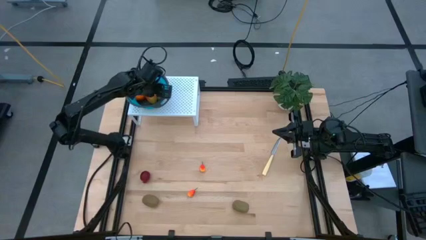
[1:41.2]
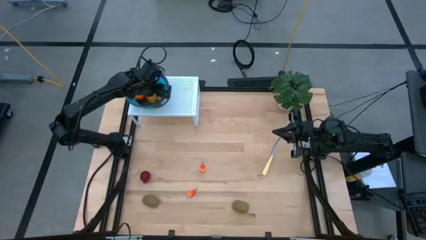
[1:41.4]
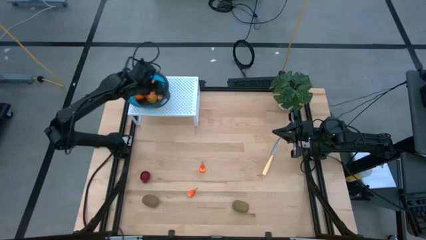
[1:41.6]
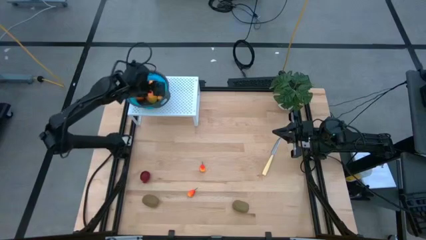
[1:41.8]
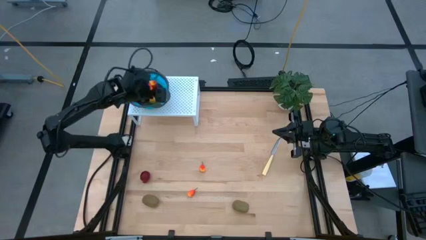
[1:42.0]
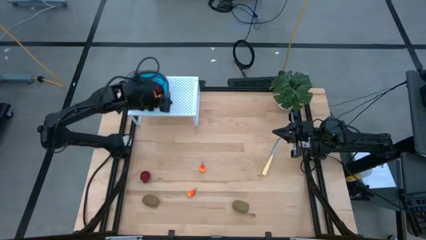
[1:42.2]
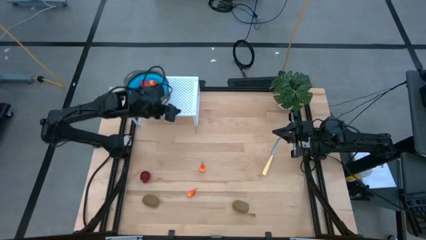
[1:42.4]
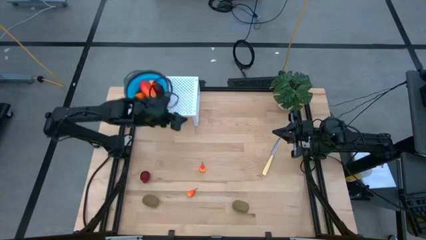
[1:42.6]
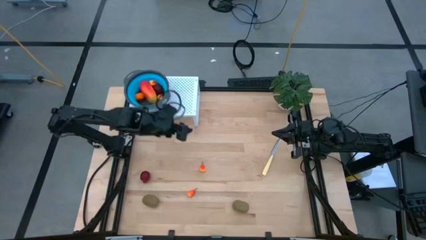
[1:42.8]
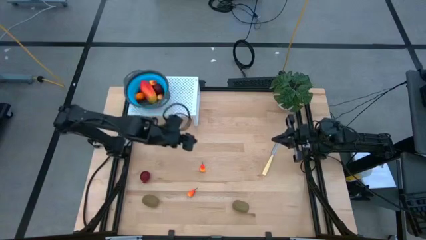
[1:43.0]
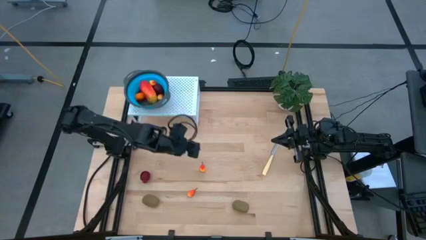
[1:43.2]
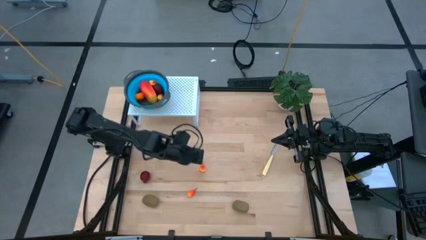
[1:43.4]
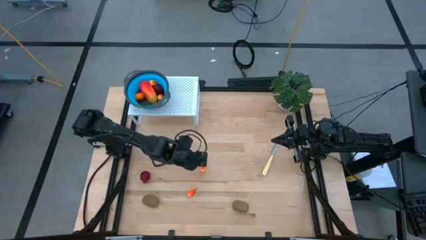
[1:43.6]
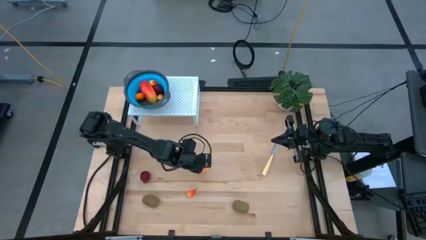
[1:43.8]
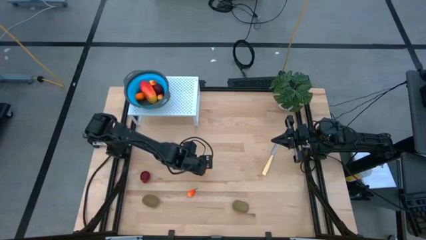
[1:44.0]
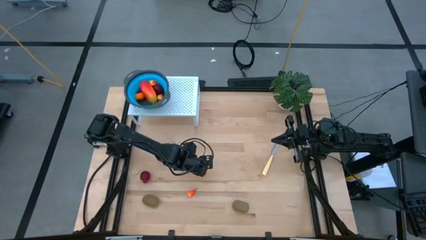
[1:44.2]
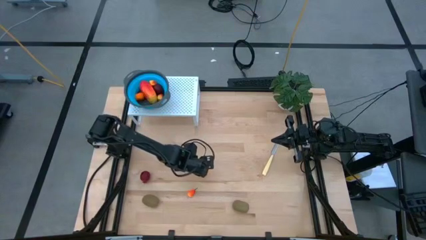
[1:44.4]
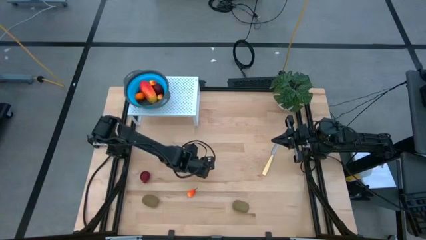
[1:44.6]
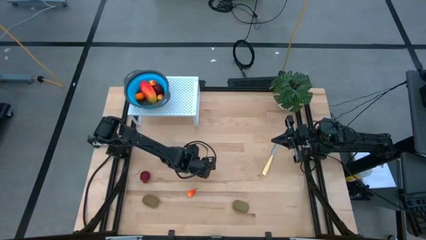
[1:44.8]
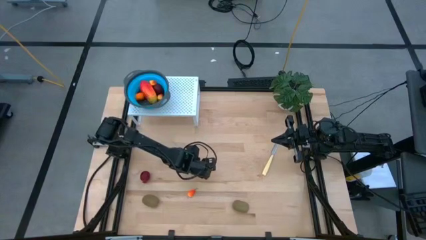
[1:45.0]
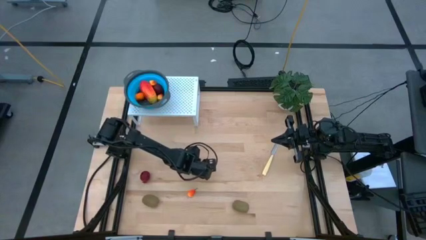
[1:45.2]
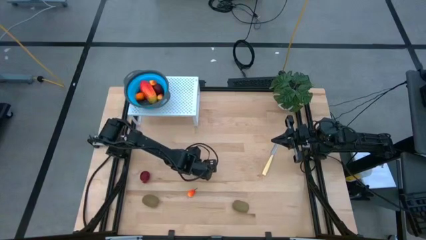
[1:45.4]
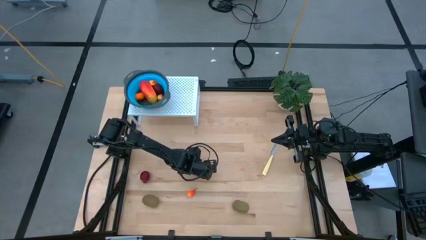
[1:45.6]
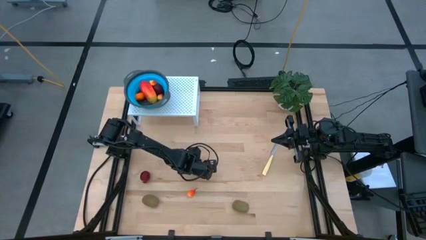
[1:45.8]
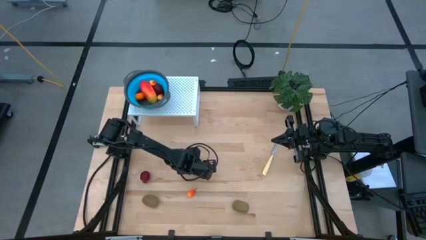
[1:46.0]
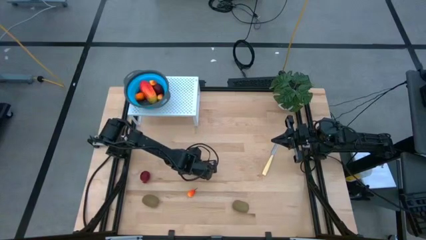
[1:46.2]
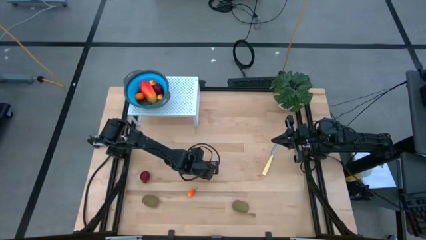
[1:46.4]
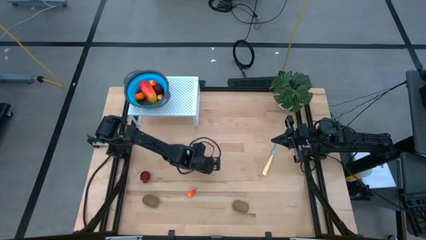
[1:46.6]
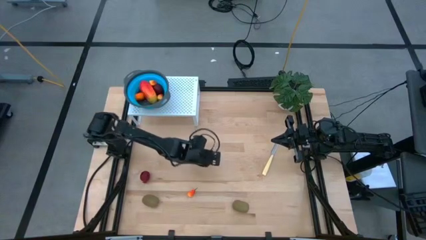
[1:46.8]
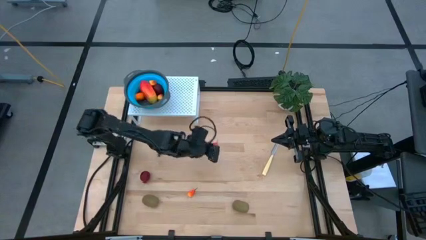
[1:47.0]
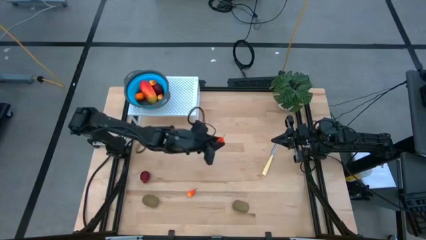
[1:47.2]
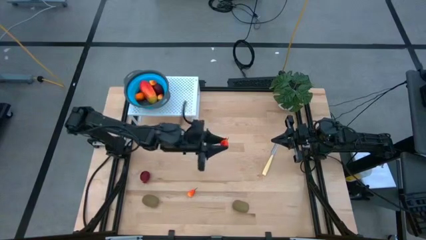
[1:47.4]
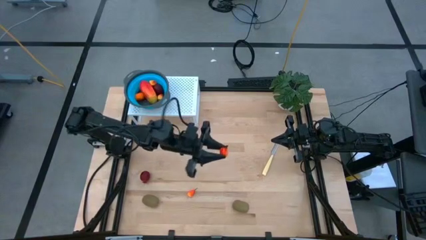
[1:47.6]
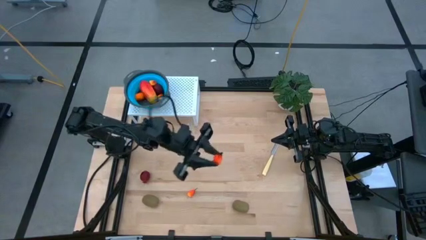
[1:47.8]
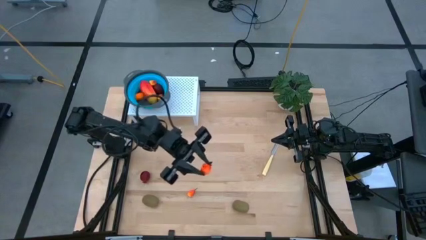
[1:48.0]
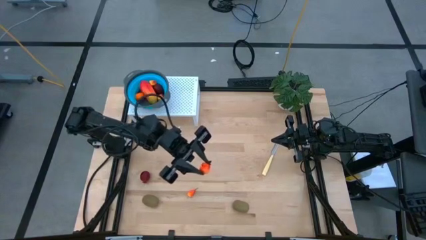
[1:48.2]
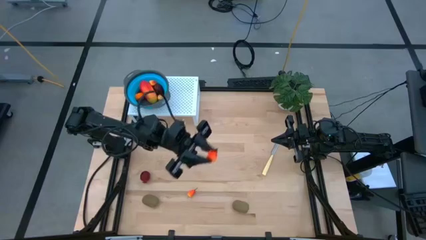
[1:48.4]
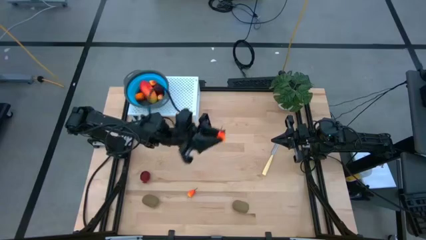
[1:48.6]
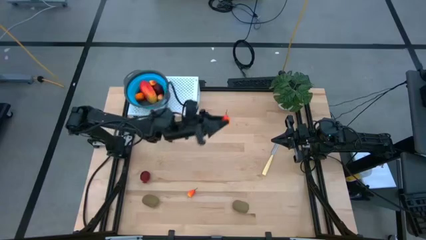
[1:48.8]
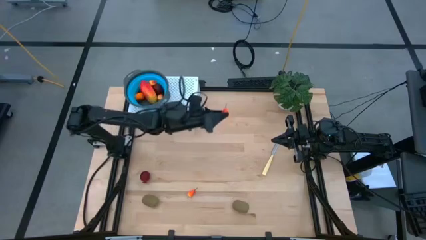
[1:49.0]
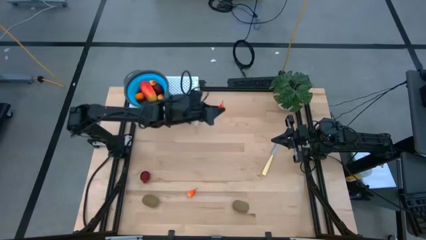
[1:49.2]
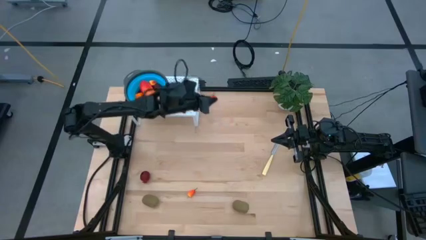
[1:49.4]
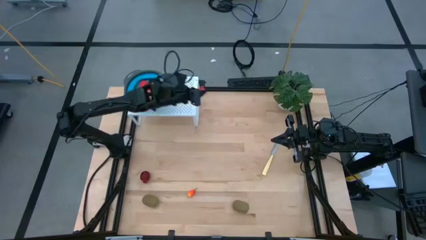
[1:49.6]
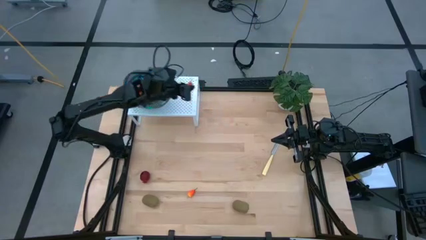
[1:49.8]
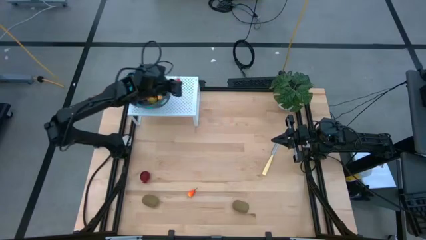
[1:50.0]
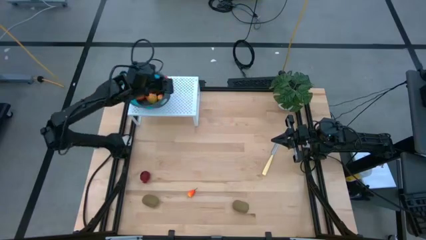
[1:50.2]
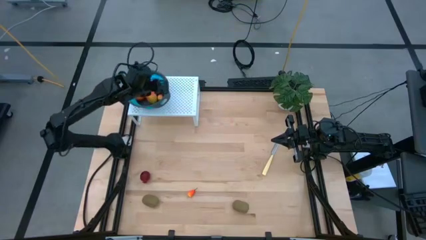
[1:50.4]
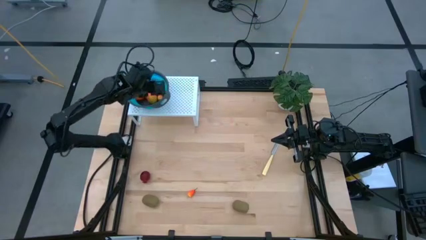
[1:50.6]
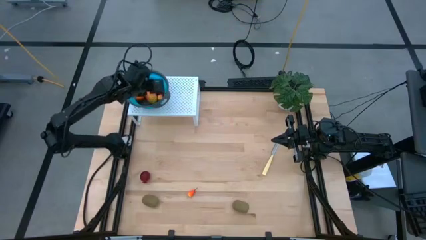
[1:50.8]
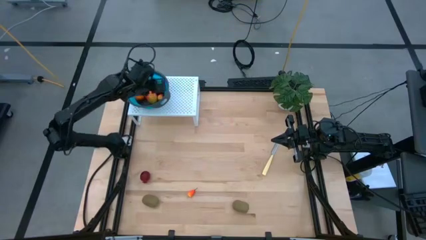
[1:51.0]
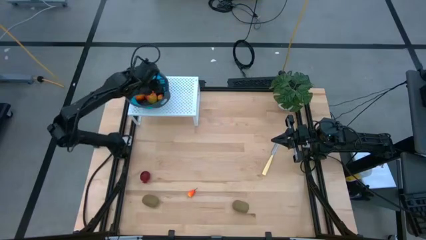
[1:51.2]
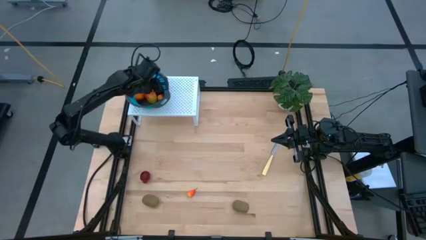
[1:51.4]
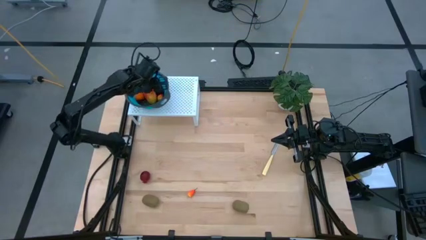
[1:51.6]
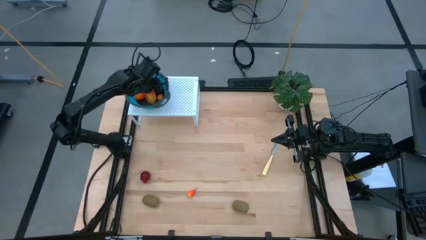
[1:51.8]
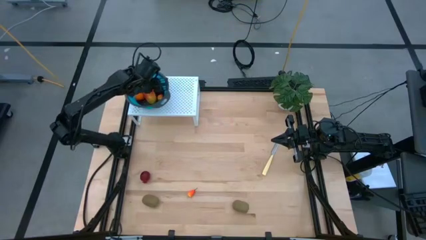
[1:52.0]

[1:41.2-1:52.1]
Task: Pick & Place Fruit
Put the top peach into the blue strainer bowl on the shelf

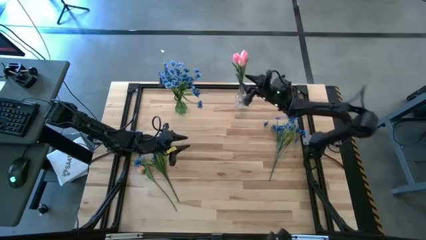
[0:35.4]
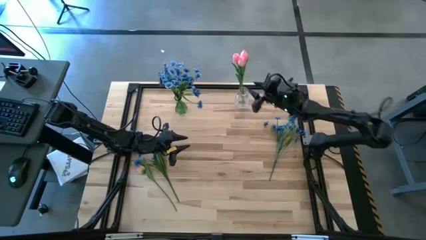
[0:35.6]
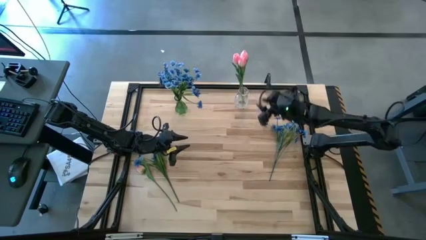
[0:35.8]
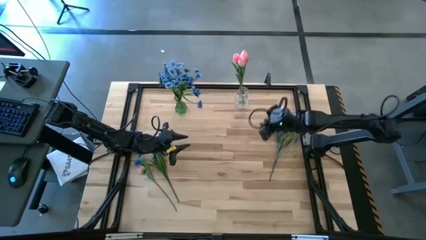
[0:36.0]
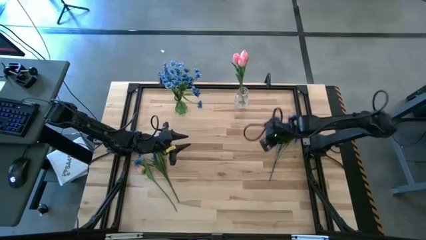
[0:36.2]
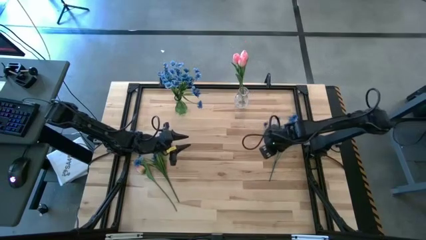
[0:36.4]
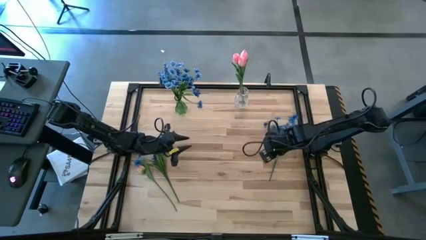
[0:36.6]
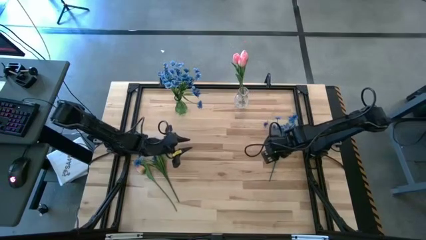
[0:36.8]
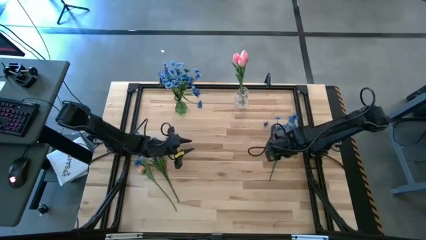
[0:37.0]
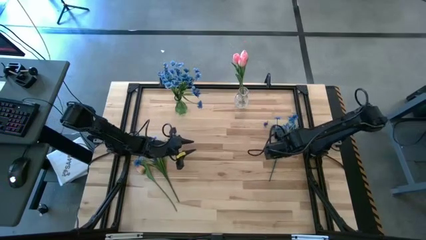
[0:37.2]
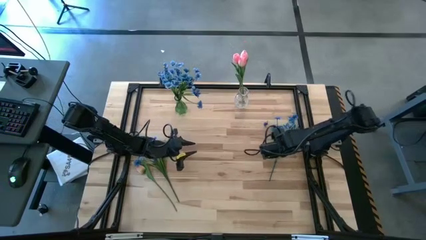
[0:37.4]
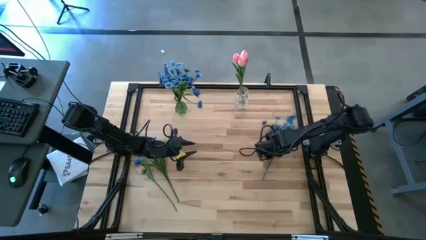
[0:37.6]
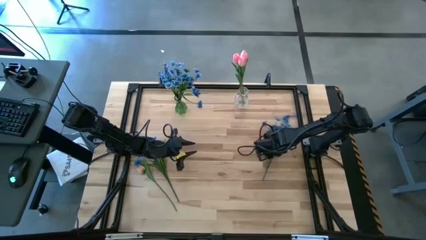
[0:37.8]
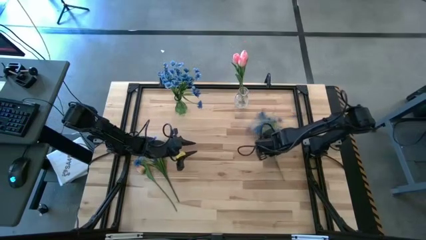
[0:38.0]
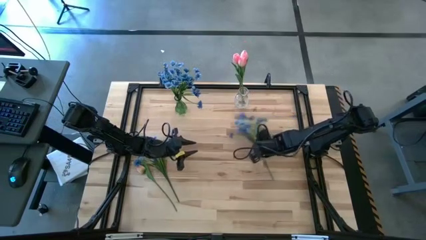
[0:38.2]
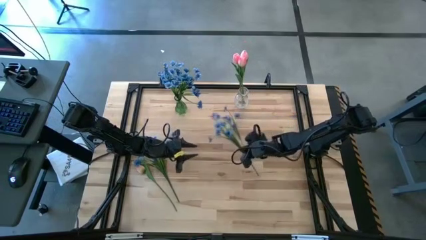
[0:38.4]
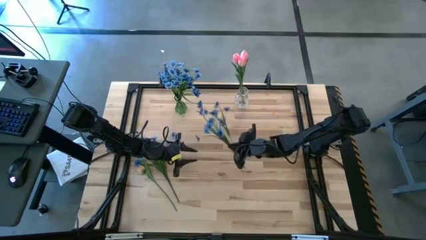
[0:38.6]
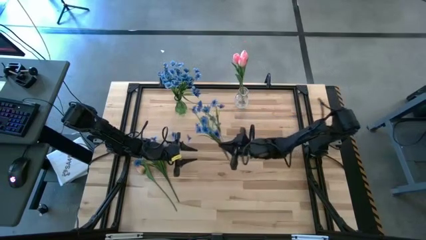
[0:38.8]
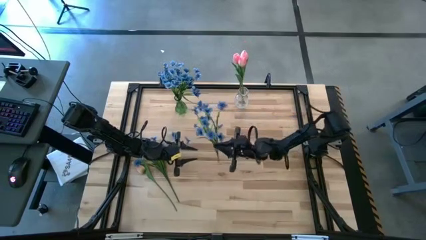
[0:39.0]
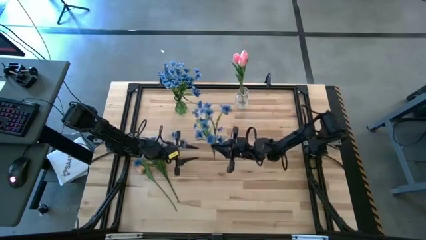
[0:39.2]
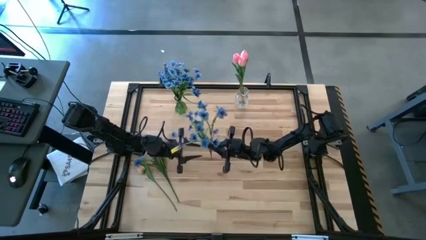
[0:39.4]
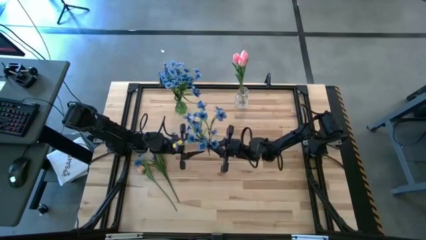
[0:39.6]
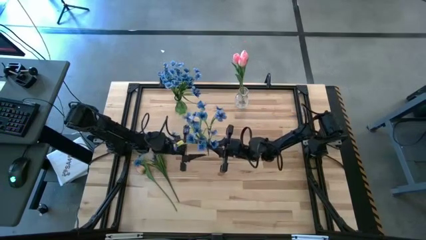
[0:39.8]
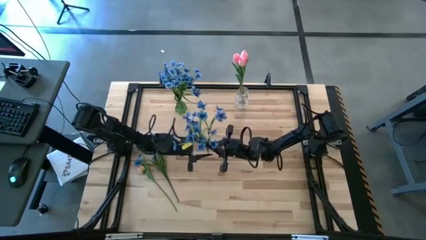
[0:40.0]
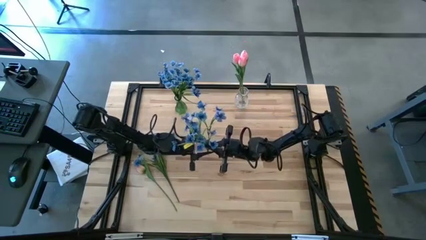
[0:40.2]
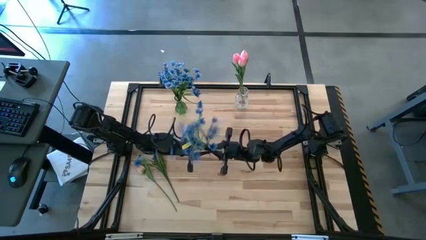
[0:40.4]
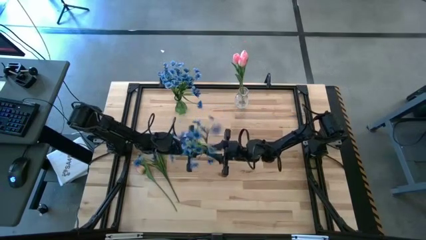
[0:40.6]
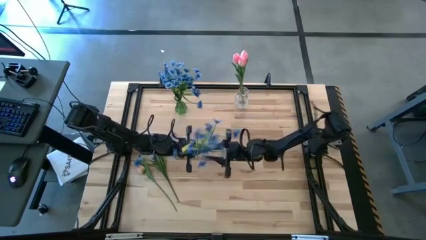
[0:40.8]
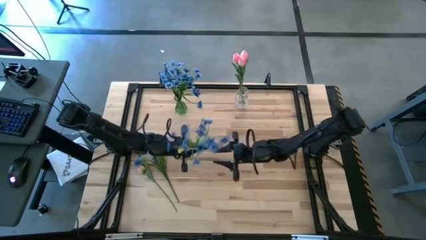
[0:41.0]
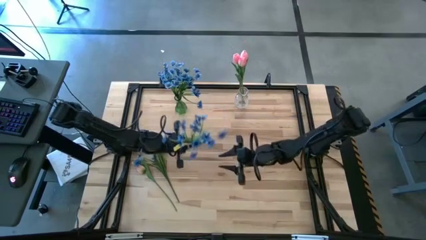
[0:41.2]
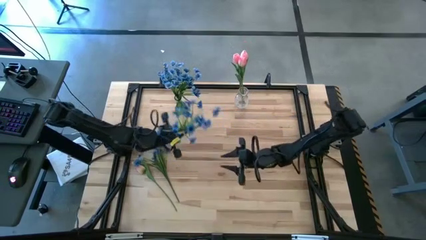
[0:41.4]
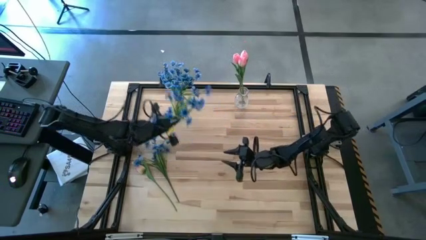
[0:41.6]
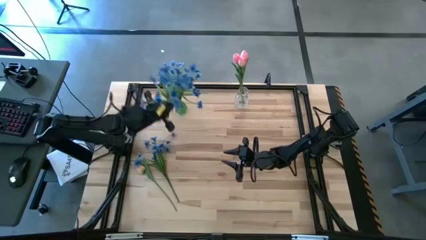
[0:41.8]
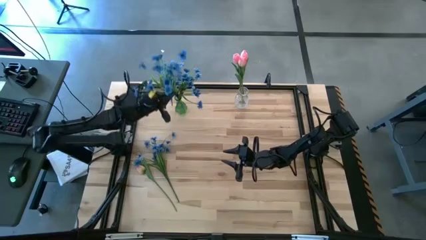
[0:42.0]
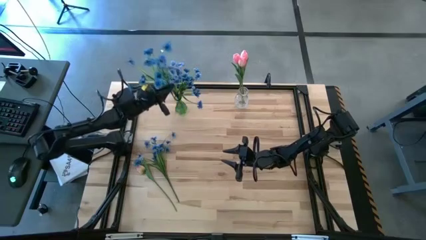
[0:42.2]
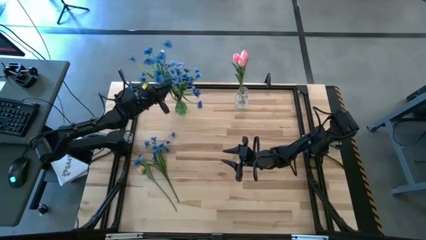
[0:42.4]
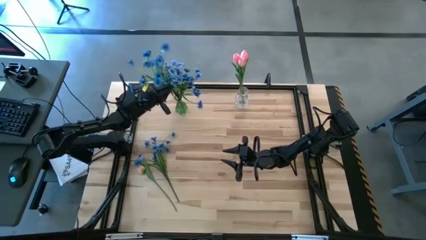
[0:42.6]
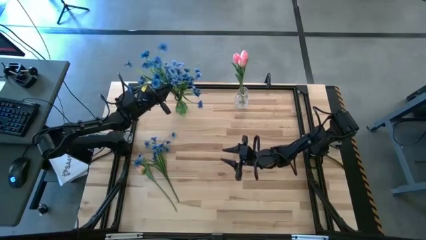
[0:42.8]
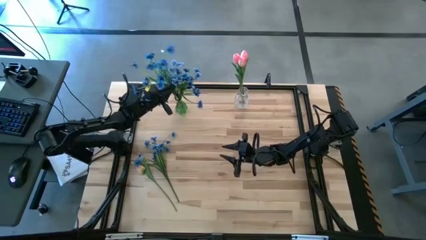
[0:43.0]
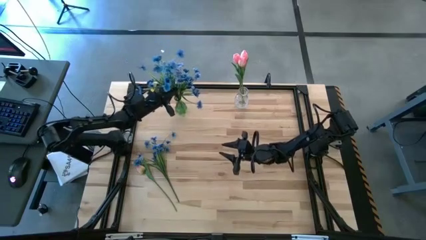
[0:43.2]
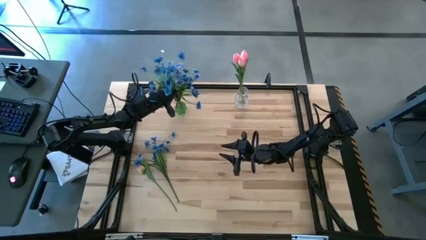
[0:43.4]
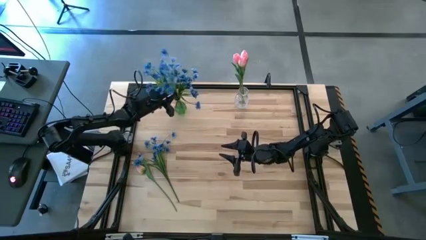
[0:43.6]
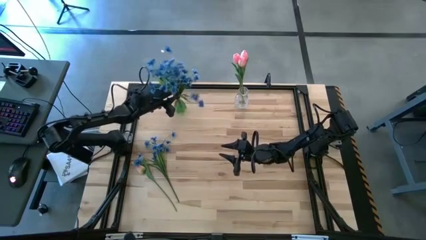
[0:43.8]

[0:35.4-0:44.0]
Task: Sort flowers into vase by color
Put the right blue flowers into the green vase
